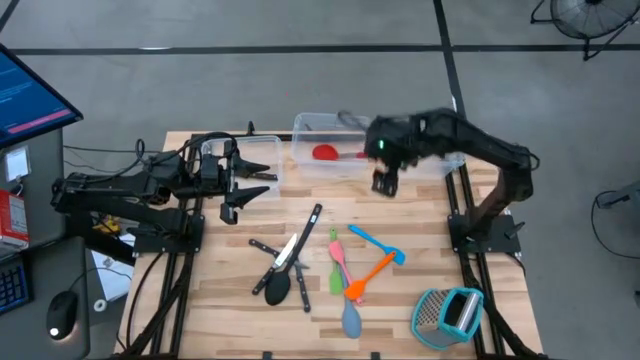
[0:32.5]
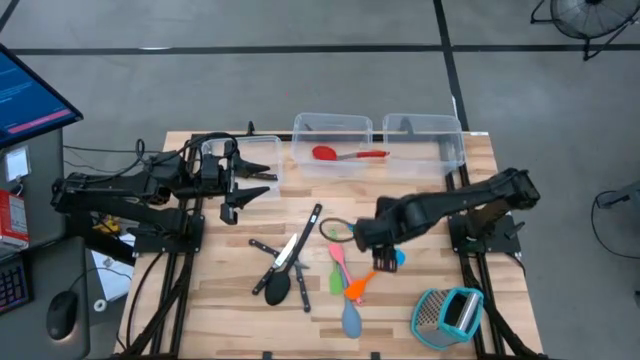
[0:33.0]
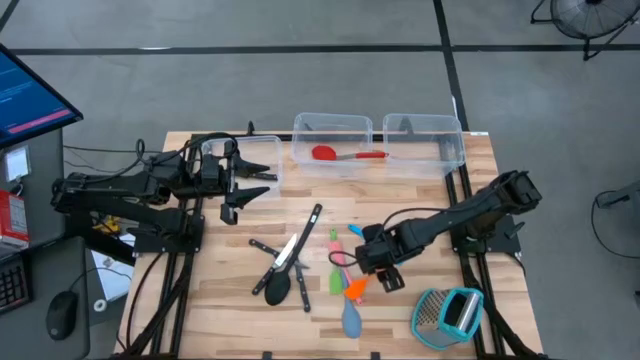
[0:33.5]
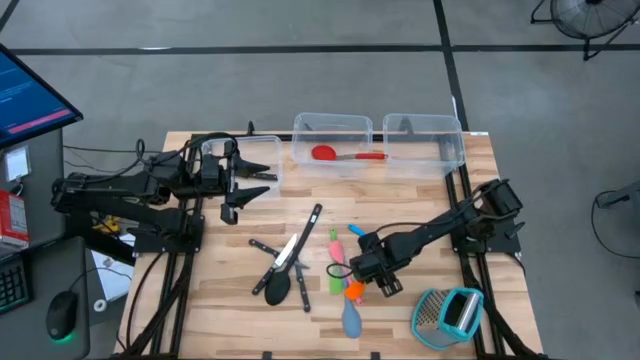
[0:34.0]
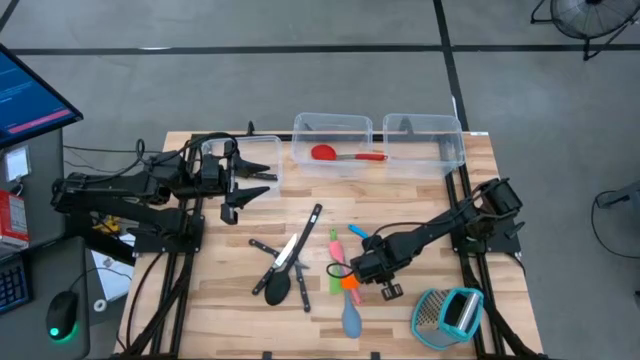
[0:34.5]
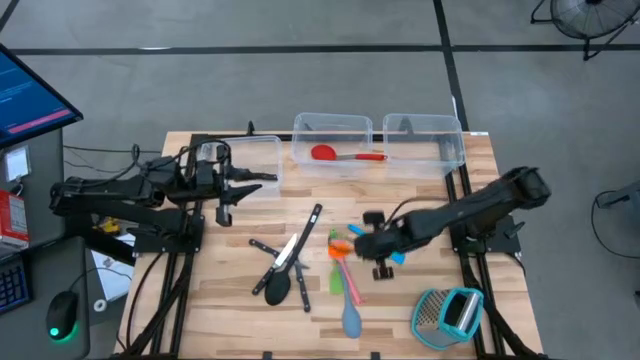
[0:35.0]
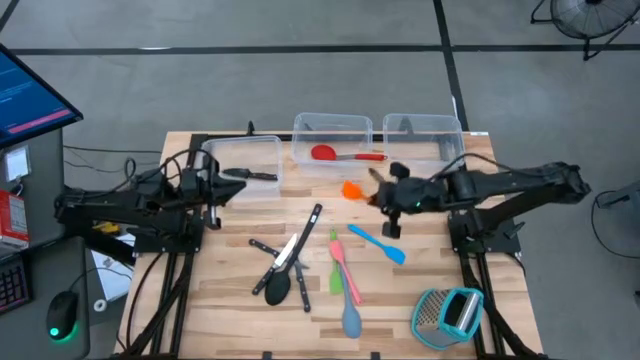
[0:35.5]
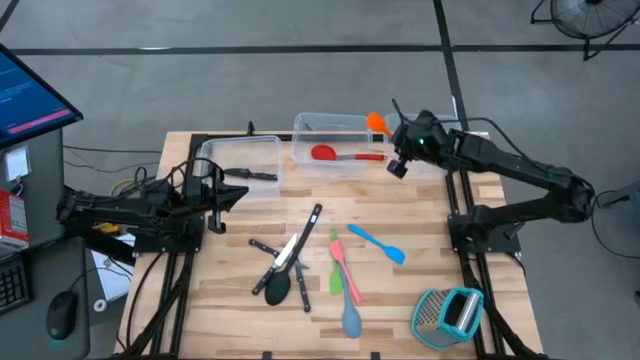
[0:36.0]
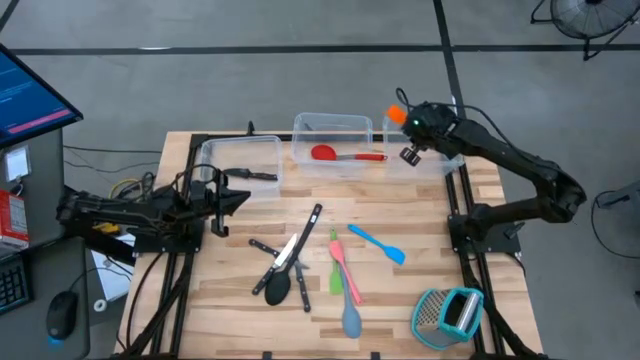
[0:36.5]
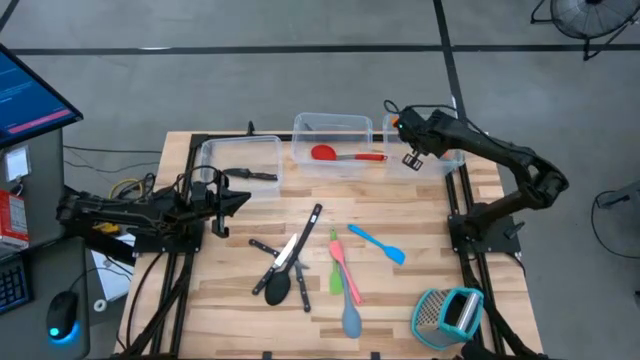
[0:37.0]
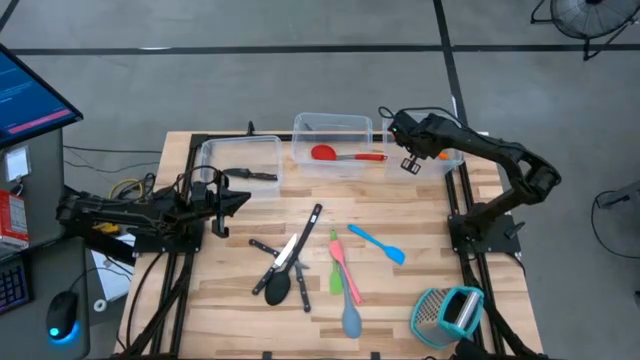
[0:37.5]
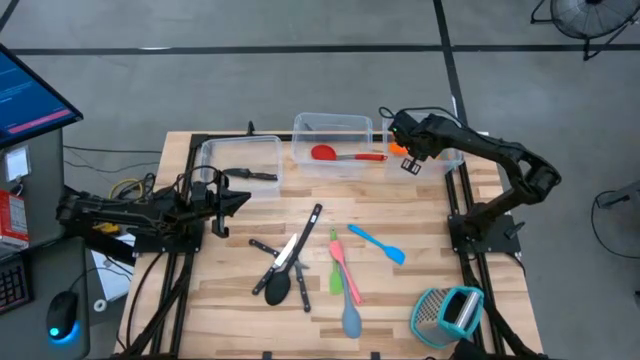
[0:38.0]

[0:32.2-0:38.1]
Task: Pick & Place Kitchen Items
Put the orange spatula into the top right transparent bin

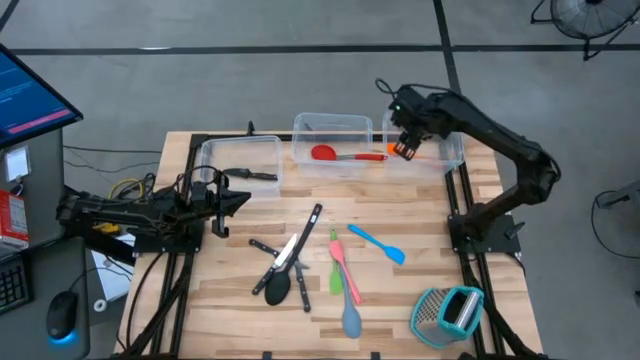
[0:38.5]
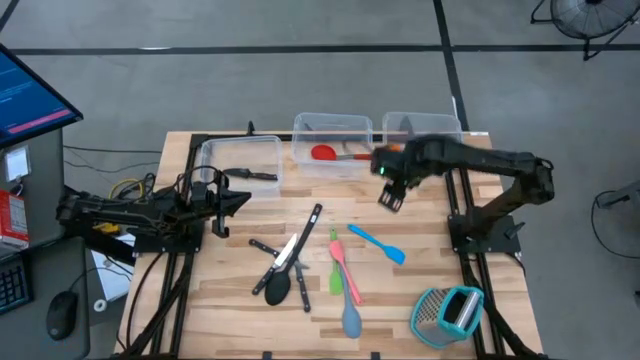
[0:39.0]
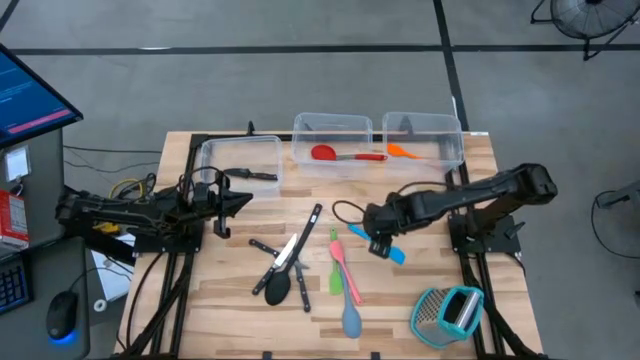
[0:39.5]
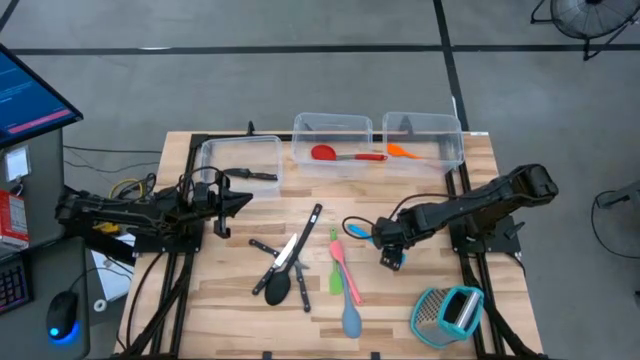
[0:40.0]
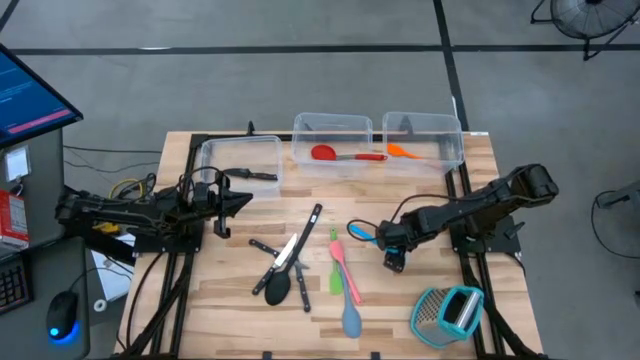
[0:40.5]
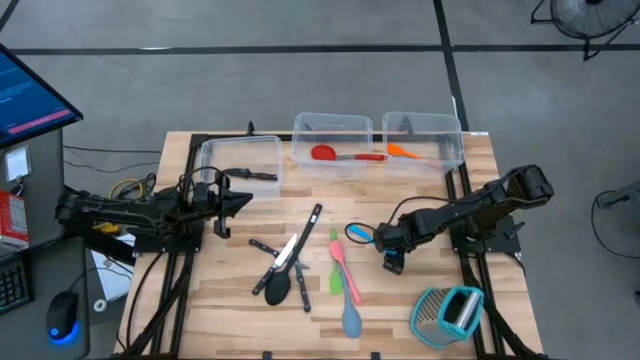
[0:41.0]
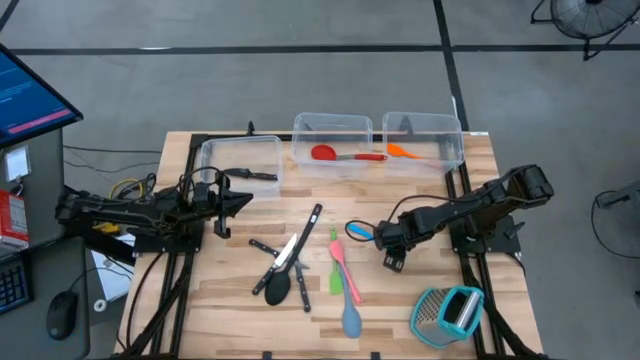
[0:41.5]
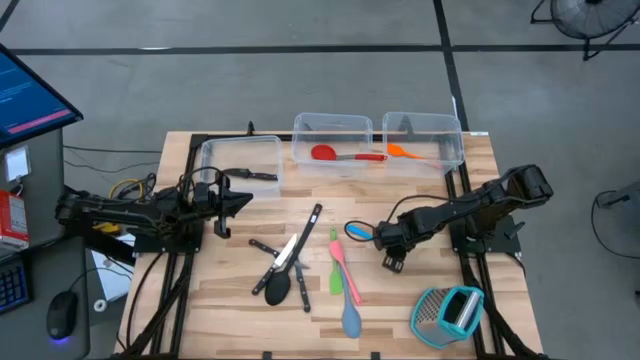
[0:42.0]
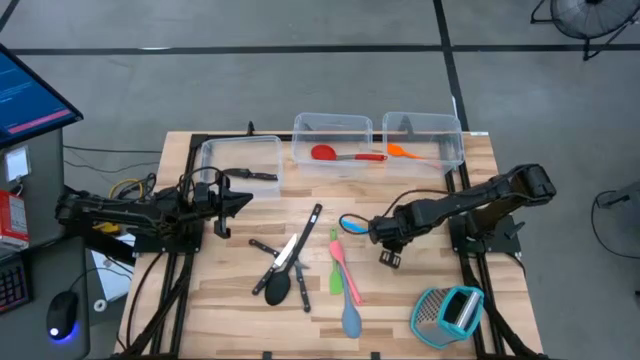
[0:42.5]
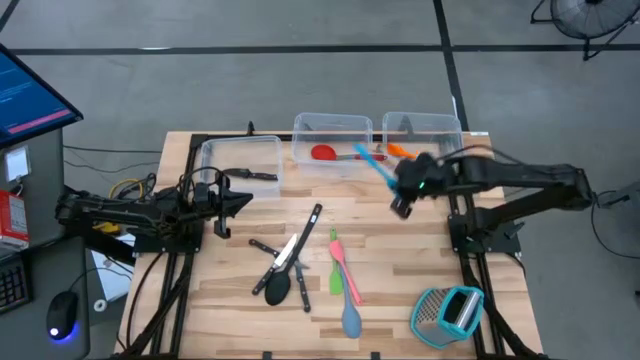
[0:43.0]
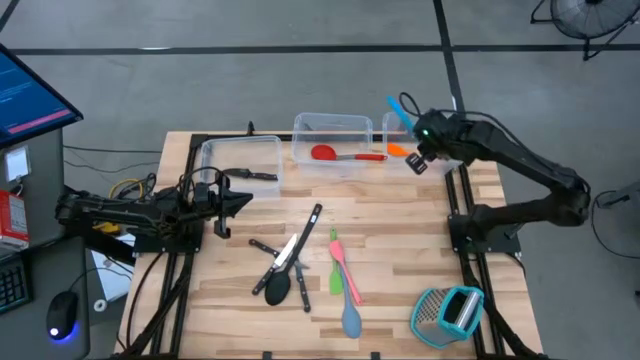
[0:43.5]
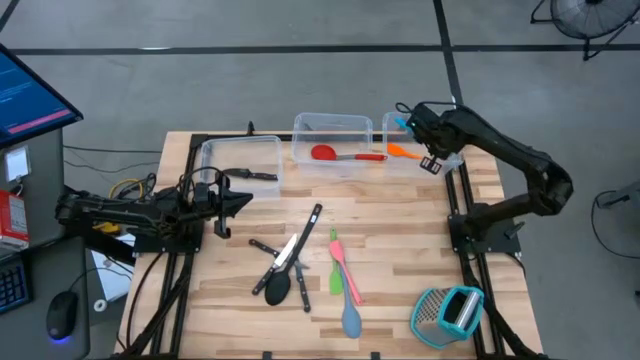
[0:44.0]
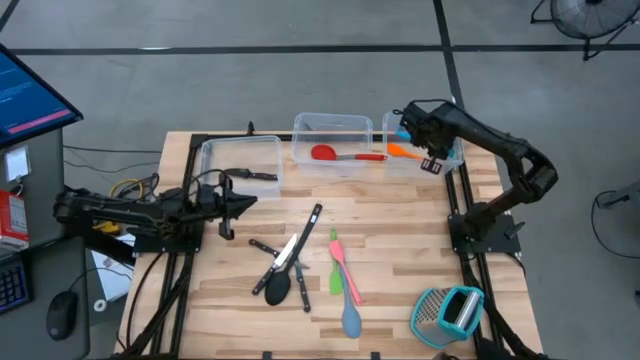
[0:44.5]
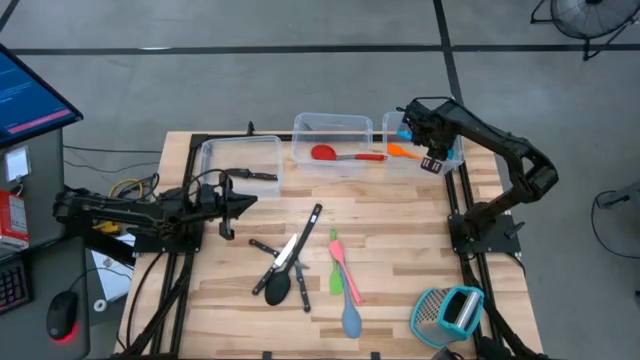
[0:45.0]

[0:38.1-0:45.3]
Put the blue spatula into the top right transparent bin

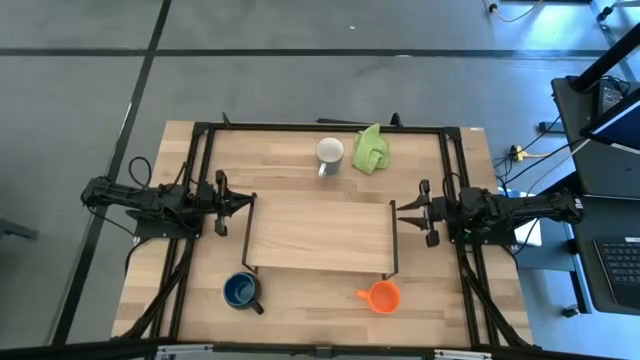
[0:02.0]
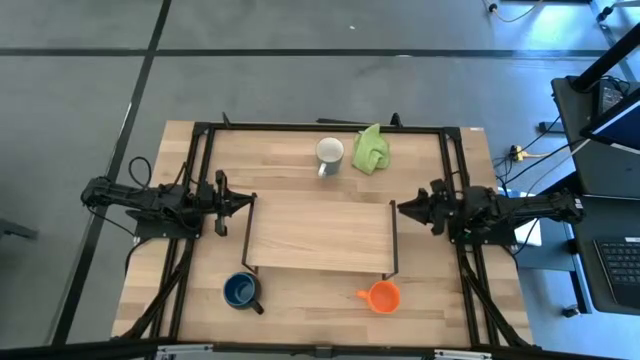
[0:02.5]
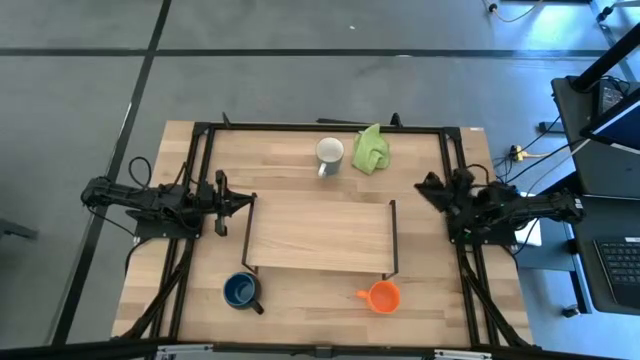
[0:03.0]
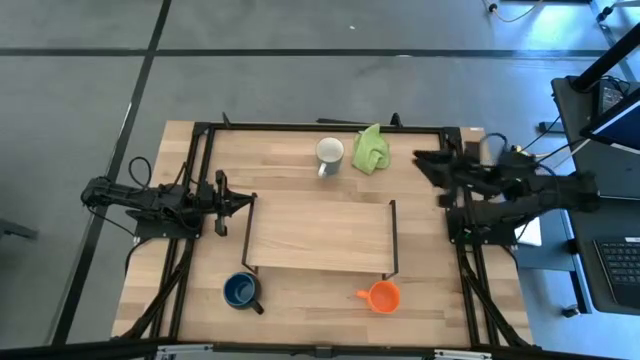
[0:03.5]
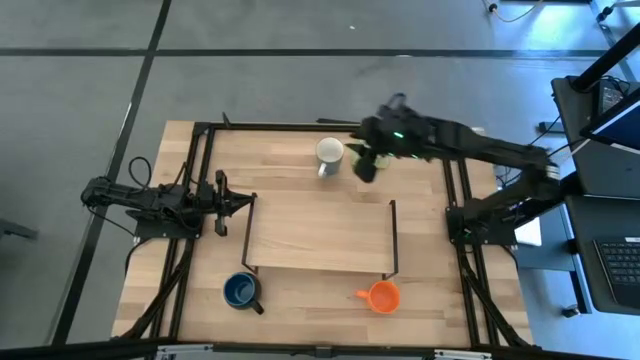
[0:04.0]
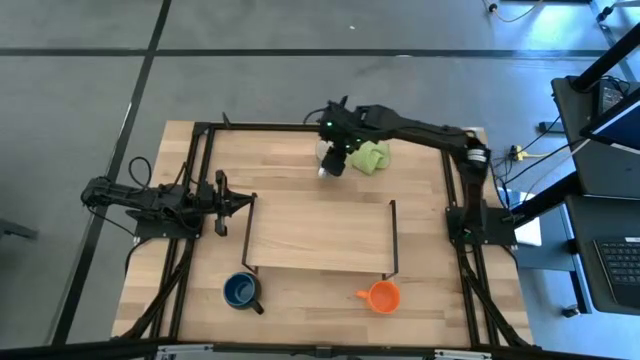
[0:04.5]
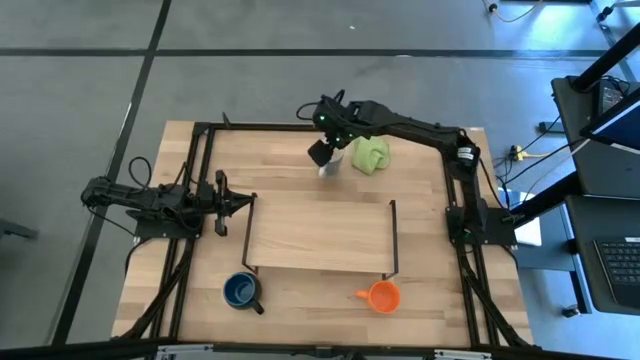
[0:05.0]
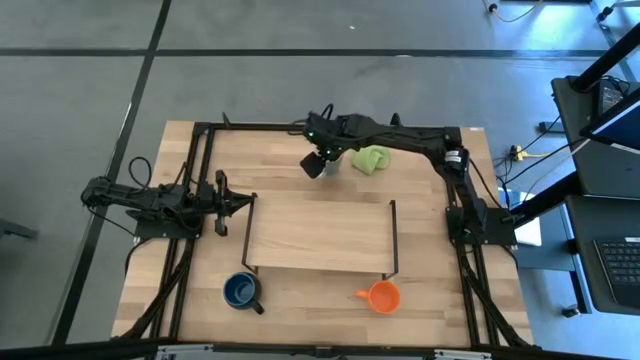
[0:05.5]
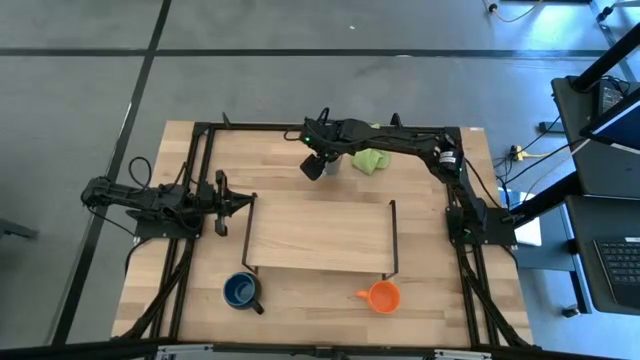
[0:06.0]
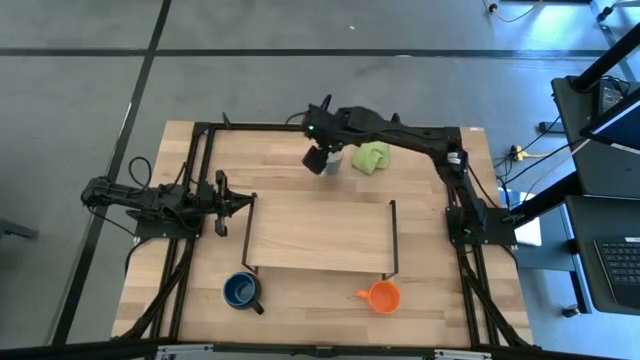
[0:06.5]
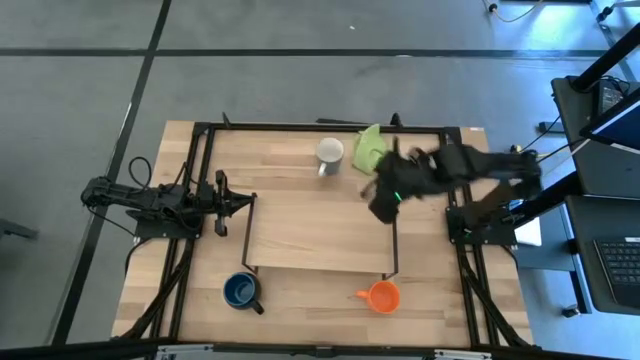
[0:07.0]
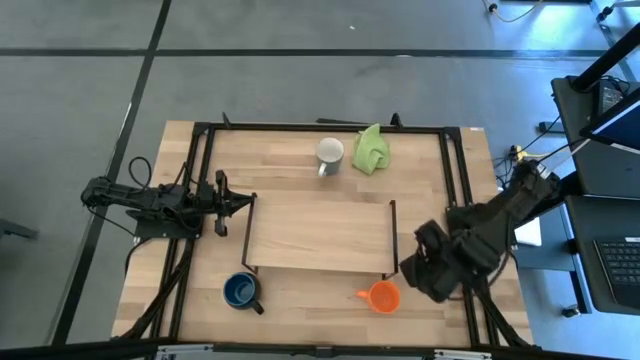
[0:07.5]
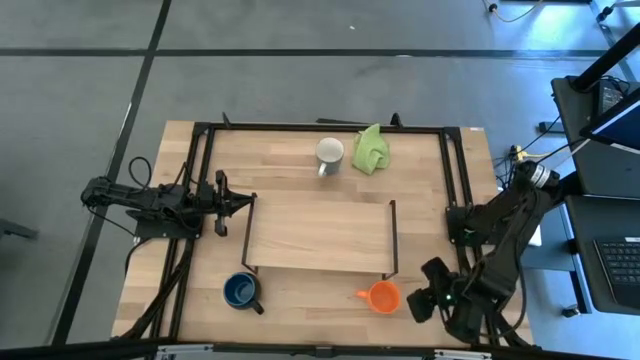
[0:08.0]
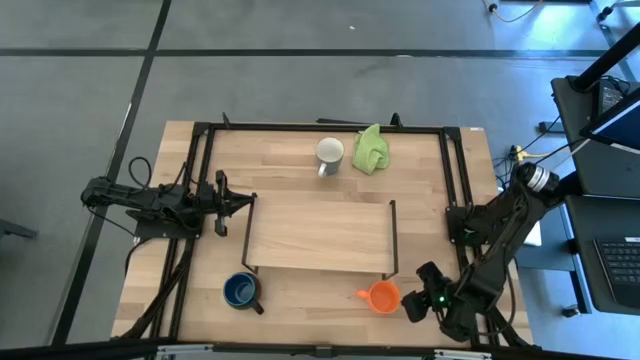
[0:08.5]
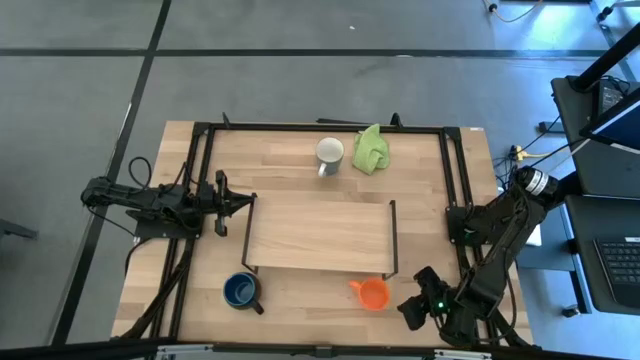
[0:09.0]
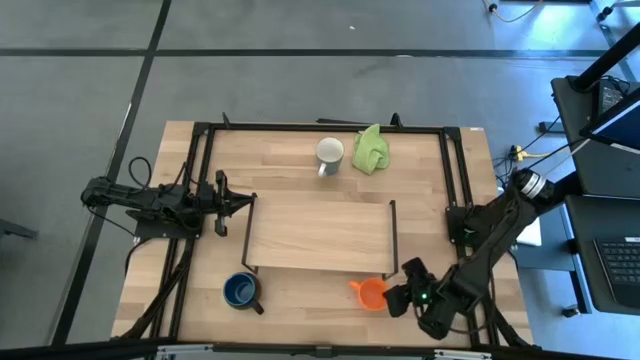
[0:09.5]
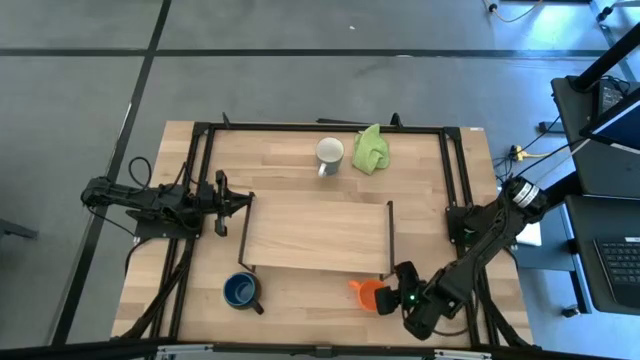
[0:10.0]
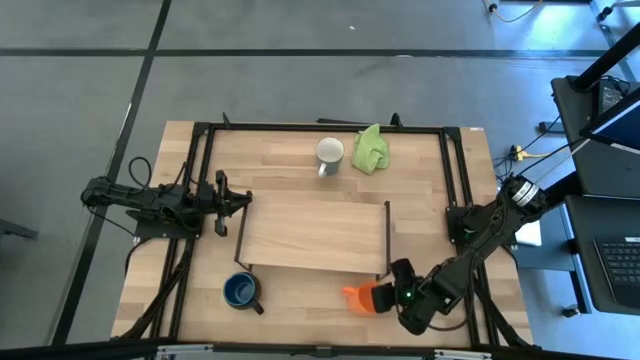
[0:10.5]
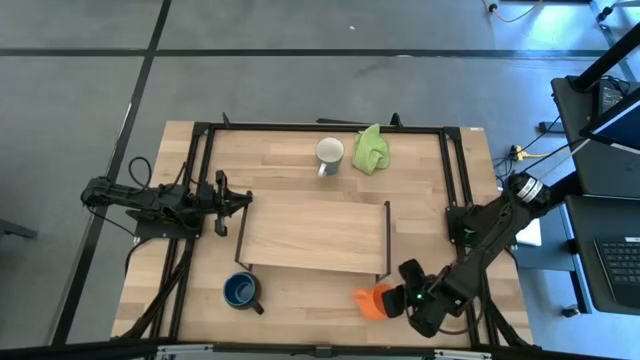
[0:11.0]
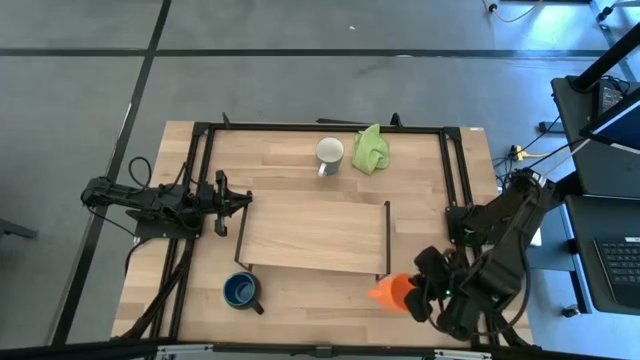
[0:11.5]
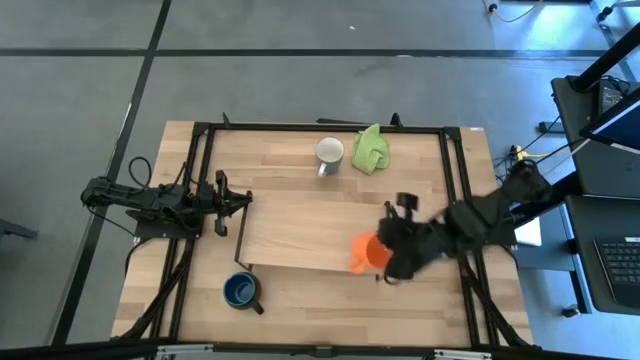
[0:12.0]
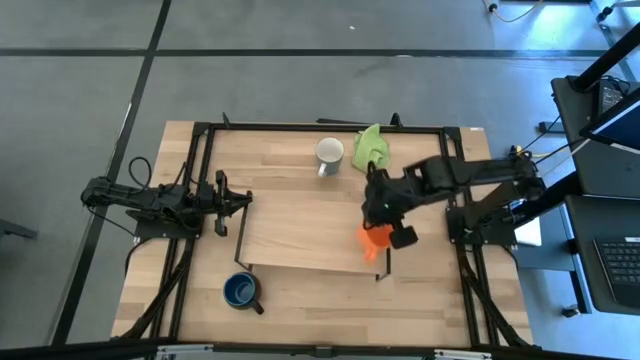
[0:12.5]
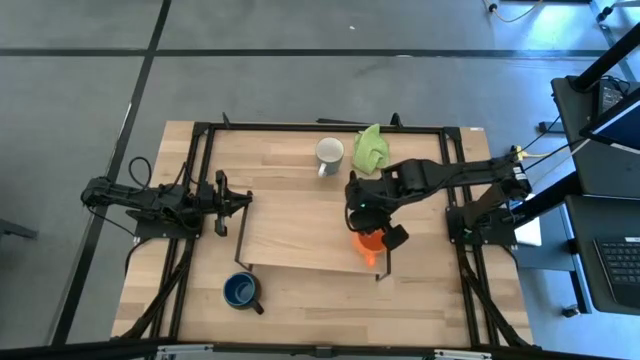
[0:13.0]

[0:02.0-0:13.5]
Task: Stack small to large cups/mugs on shelf
Put the orange mugs on the shelf
